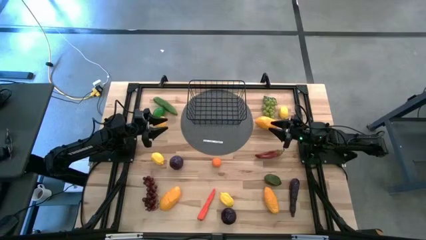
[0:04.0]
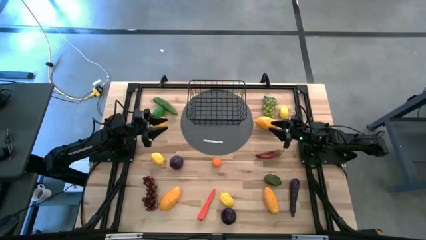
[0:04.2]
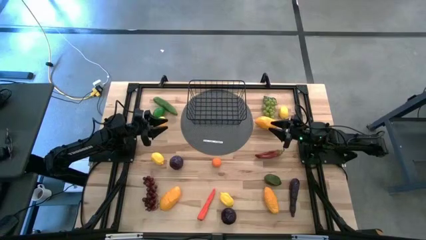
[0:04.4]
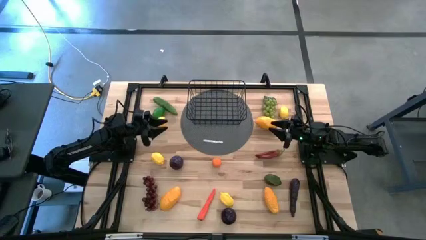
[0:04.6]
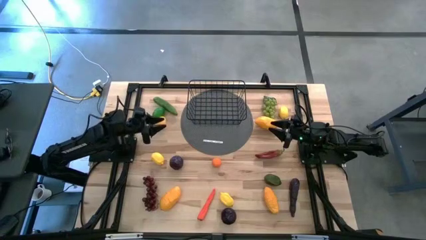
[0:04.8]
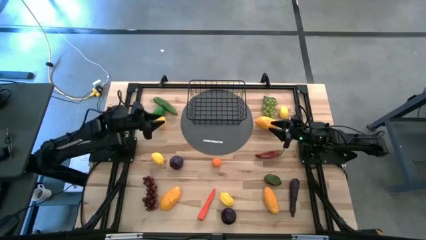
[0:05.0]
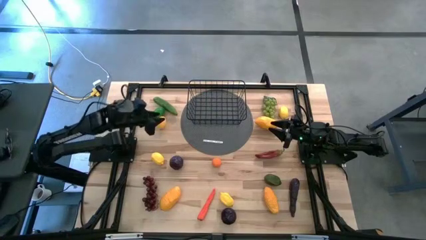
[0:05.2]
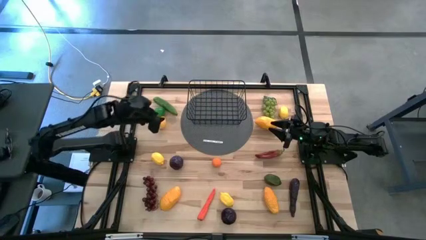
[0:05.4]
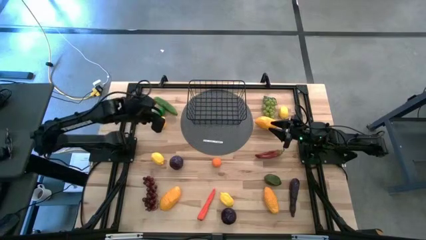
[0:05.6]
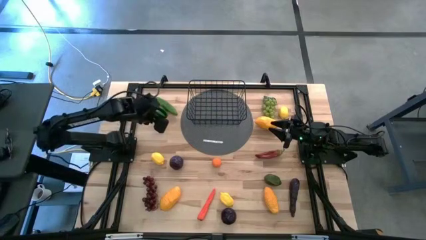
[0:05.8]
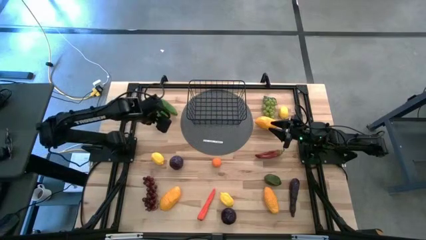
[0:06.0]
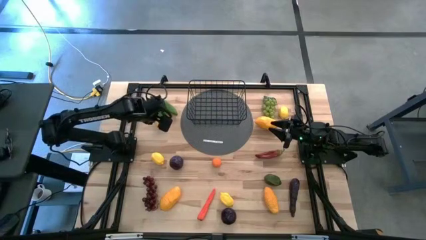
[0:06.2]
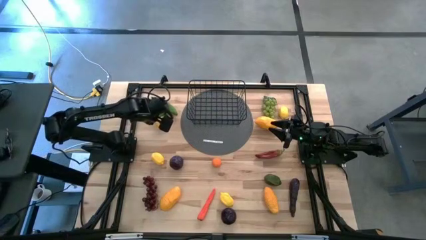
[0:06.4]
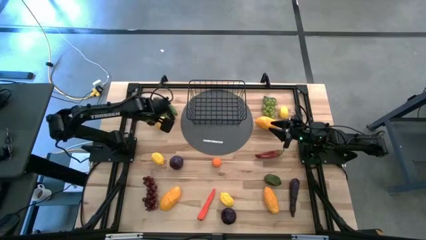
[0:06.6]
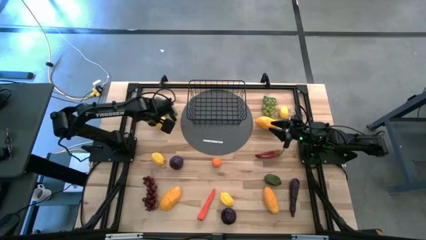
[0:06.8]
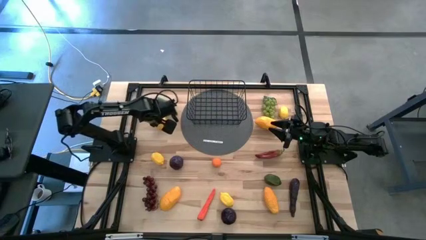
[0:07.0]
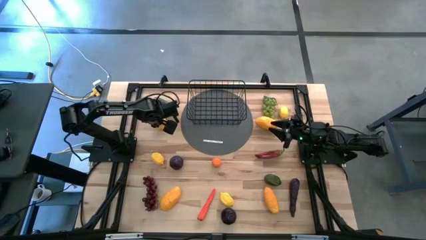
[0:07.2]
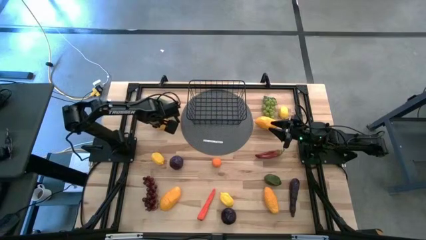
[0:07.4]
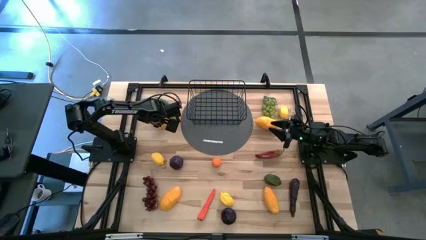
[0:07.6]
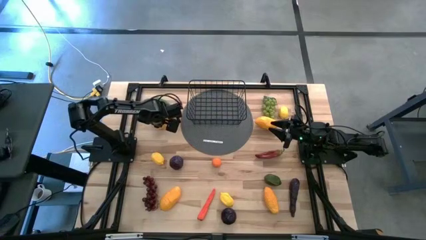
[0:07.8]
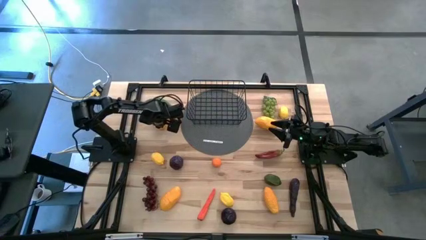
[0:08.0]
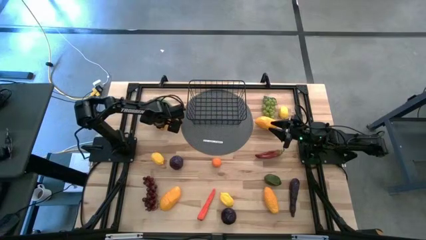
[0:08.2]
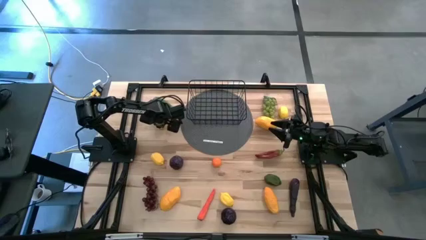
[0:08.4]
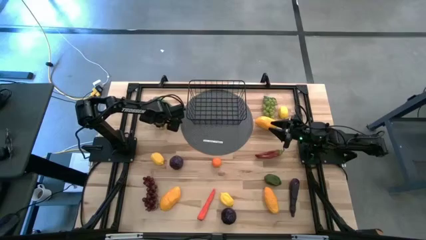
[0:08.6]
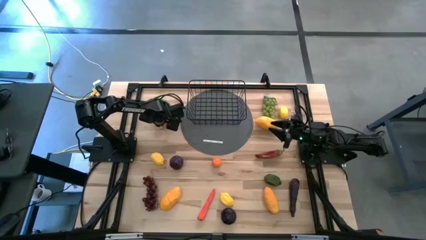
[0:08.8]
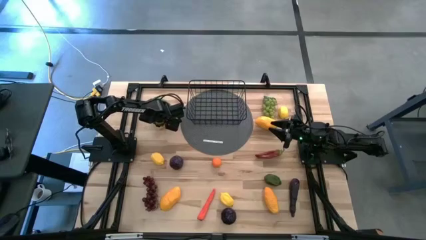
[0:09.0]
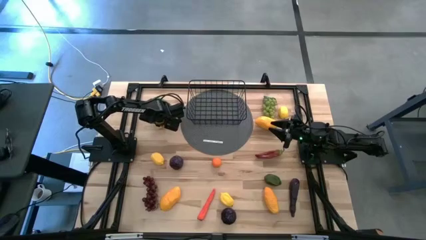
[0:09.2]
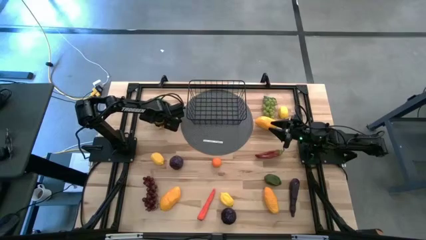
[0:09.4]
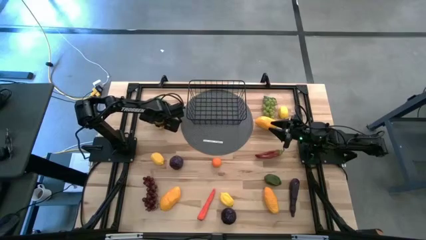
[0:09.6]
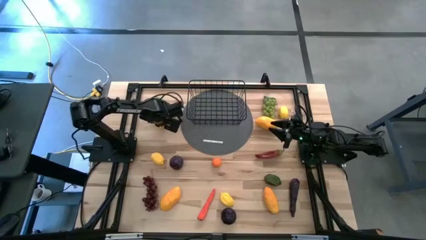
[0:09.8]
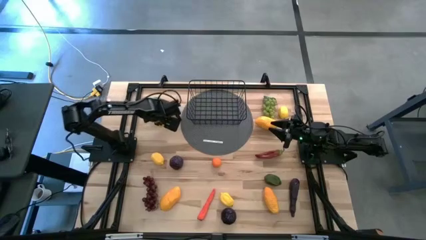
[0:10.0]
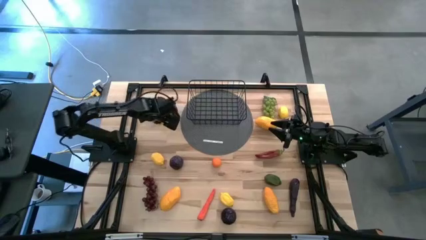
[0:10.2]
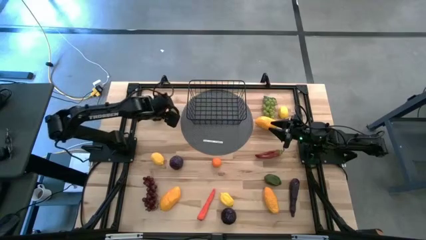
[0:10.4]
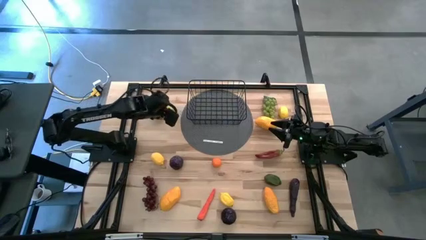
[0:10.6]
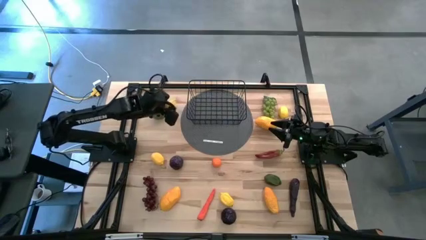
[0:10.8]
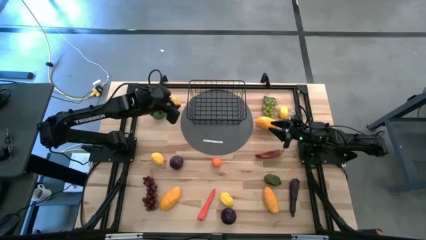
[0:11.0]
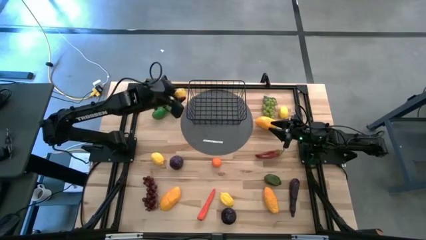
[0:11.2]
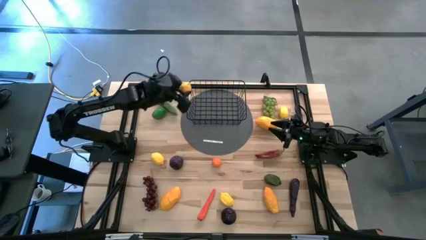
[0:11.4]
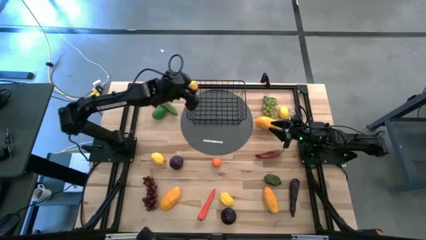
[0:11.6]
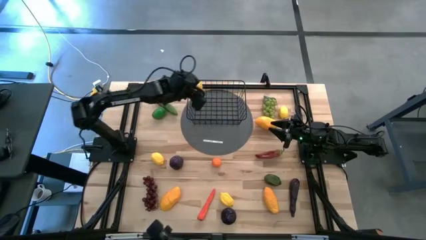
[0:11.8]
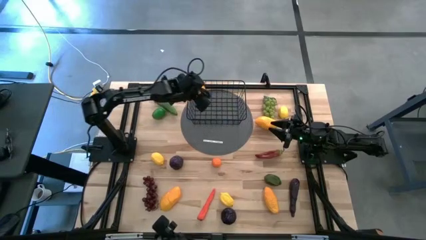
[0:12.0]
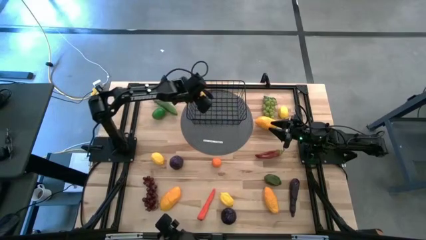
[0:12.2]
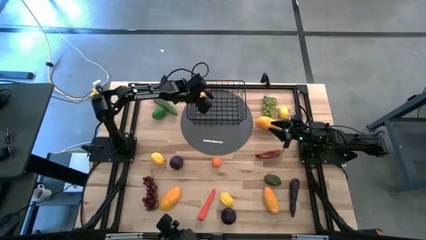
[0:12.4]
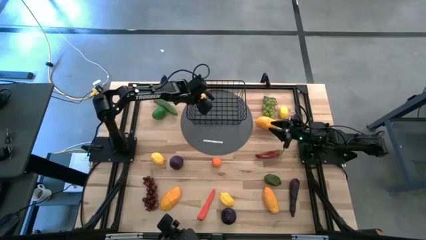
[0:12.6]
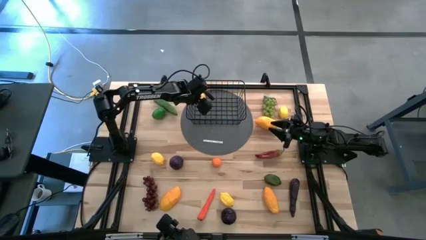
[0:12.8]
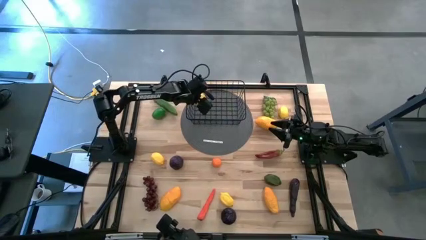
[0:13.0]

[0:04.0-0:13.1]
Task: Build produce basket
Put the yellow lemon into the basket

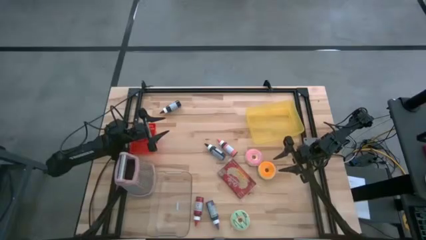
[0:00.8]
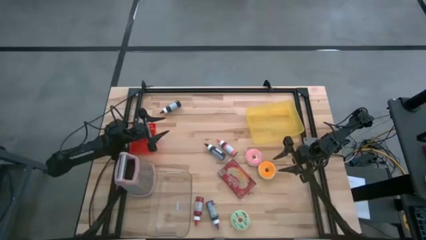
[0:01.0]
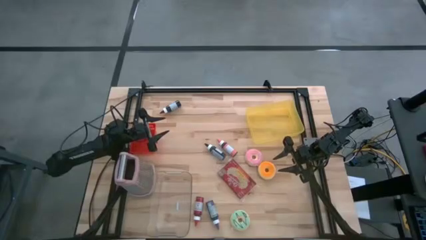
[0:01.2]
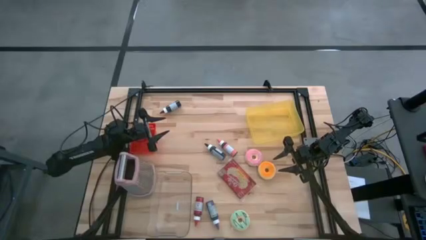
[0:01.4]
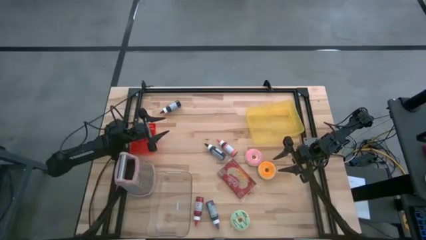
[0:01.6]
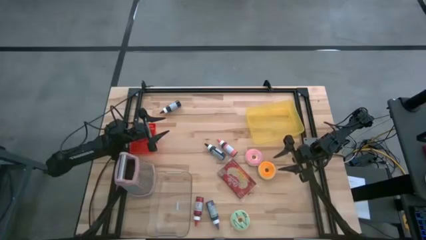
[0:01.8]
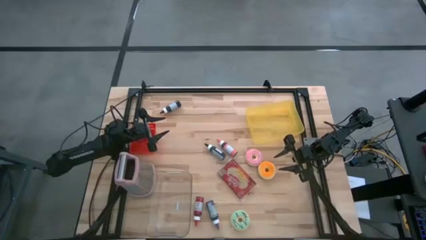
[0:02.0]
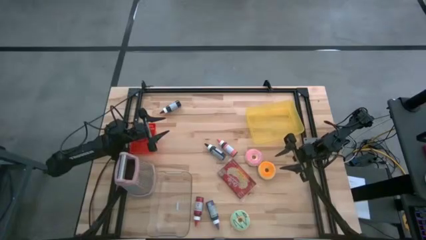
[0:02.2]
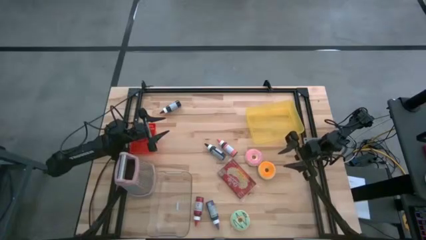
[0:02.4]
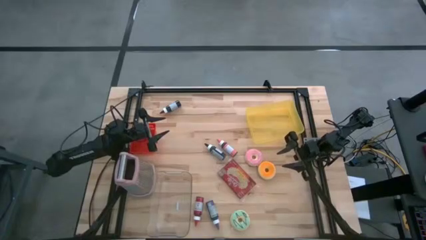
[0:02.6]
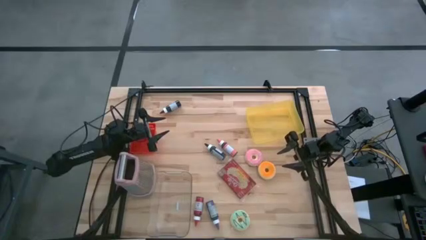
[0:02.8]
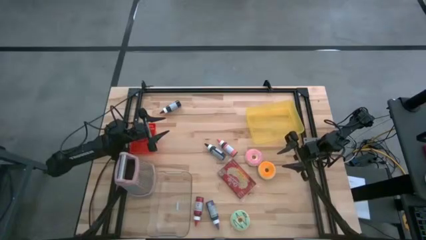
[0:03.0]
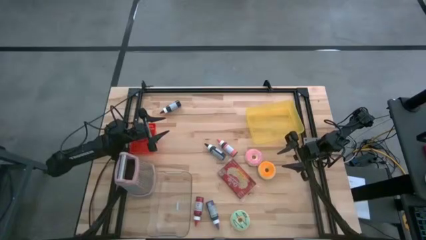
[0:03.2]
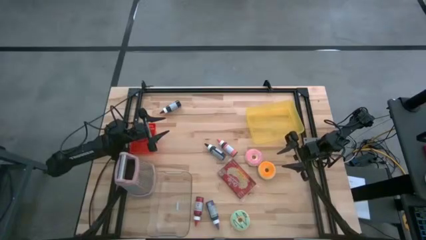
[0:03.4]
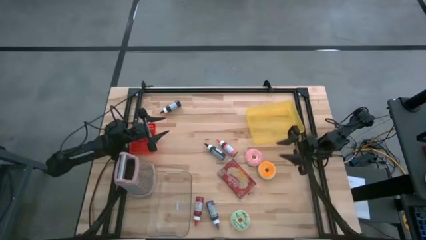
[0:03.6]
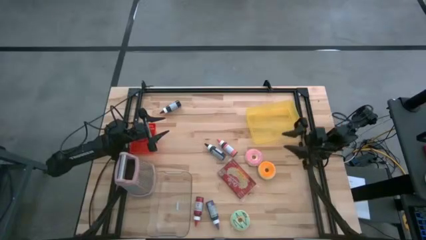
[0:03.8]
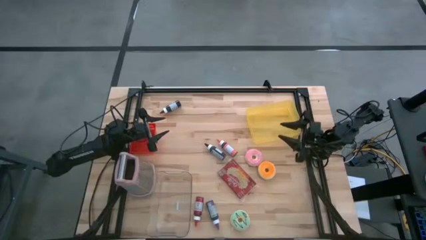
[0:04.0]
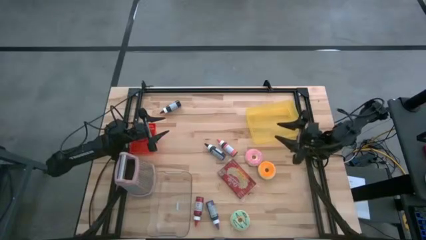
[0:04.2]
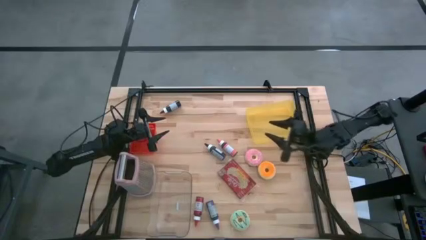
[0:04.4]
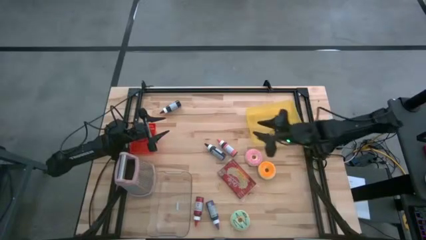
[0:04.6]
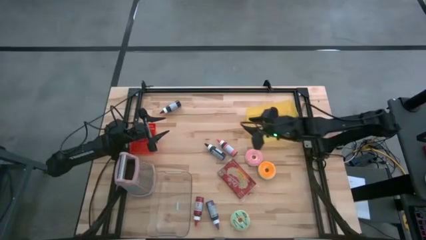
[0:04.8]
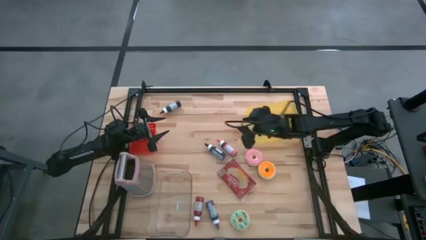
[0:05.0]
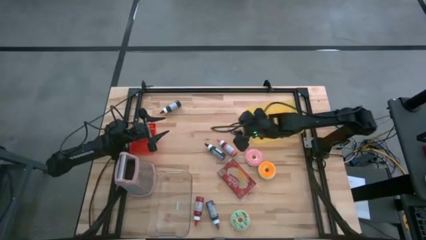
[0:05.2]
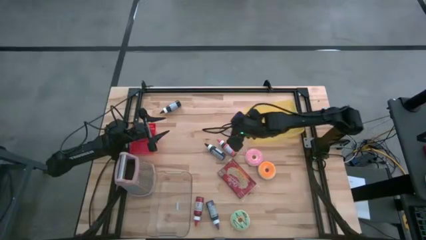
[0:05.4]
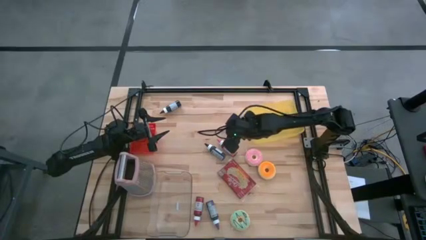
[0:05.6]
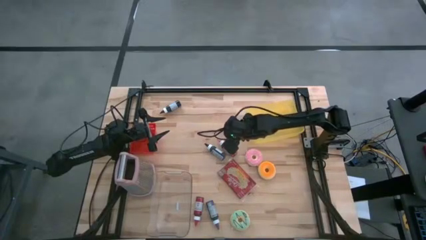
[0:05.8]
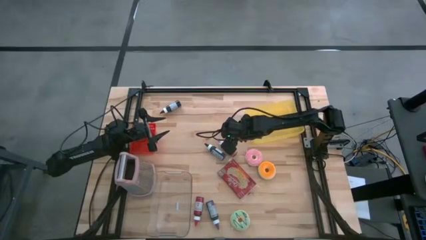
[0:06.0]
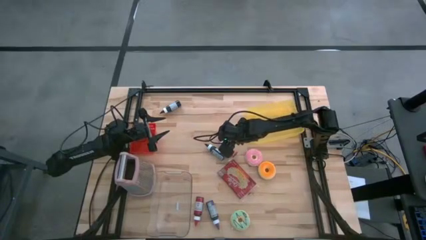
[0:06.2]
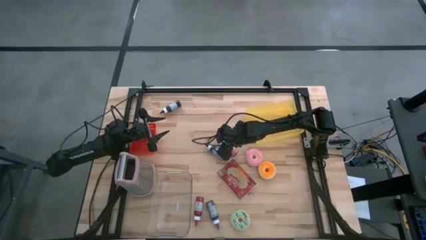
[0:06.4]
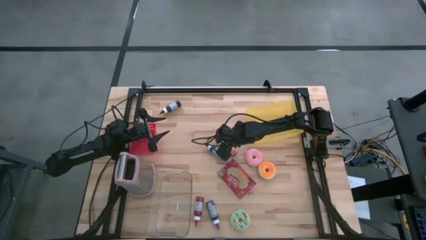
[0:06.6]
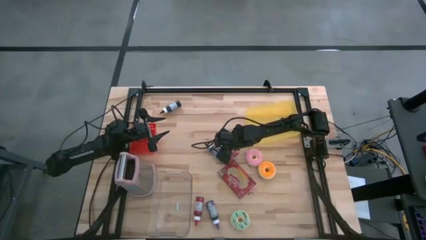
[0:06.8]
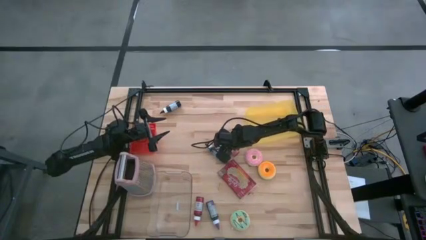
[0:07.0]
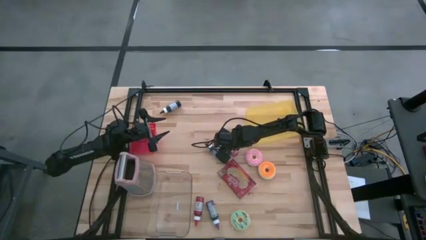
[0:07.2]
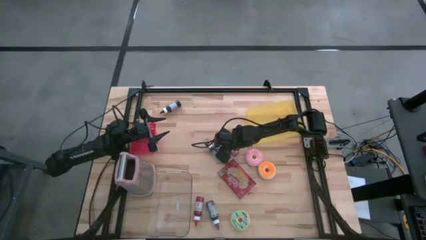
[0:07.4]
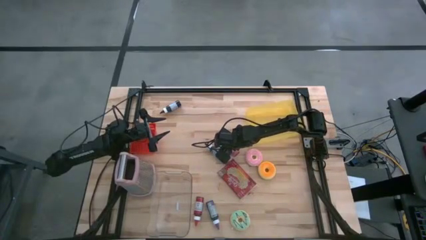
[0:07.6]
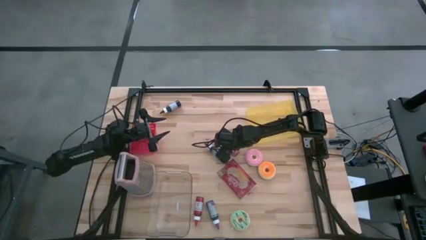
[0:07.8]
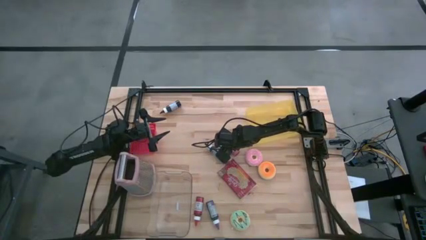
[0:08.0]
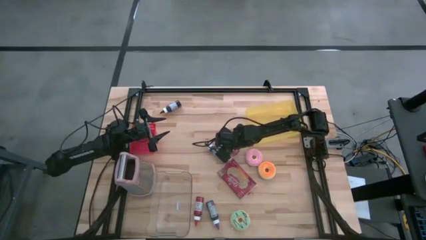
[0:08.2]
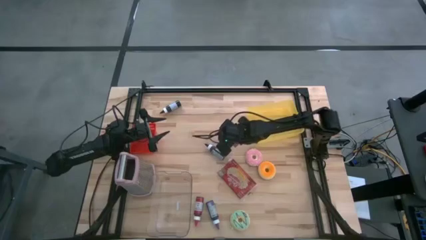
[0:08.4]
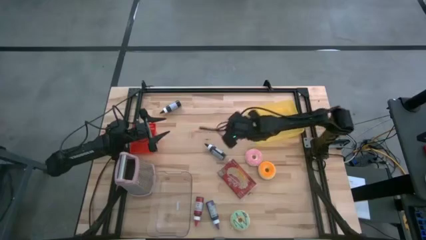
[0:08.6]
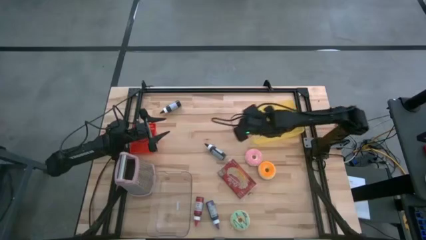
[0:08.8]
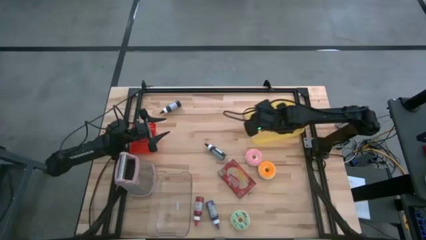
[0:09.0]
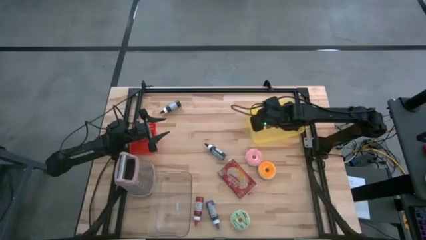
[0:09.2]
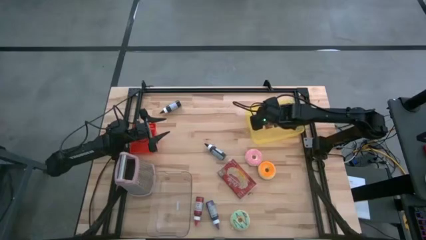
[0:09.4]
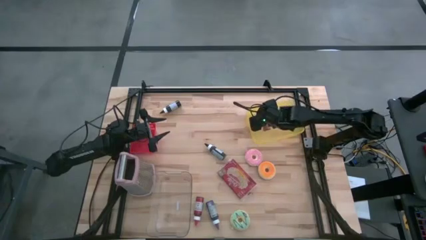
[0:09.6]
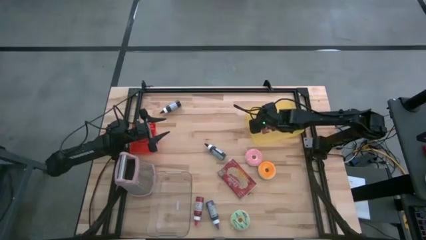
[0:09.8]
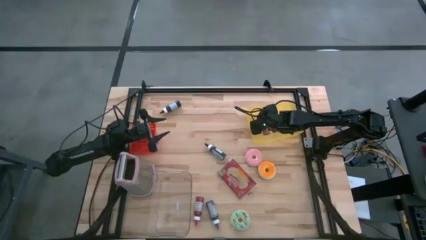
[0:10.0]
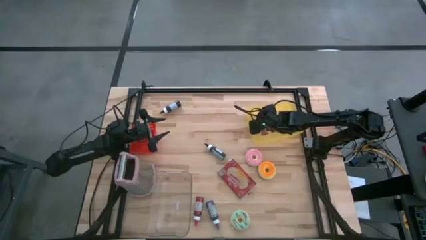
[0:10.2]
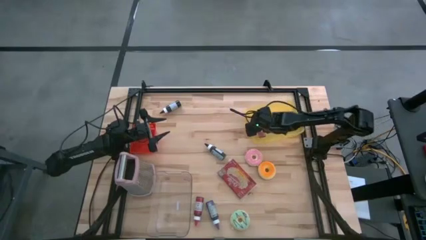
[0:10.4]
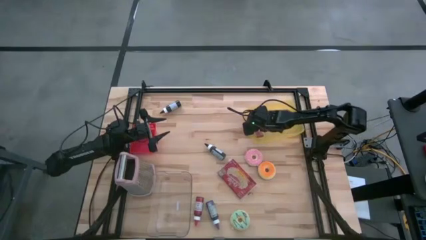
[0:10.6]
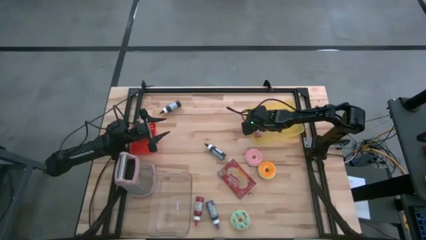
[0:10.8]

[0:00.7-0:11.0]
Task: Pick & Place Food Item
Put the pink food coloring bottle into the yellow bin
